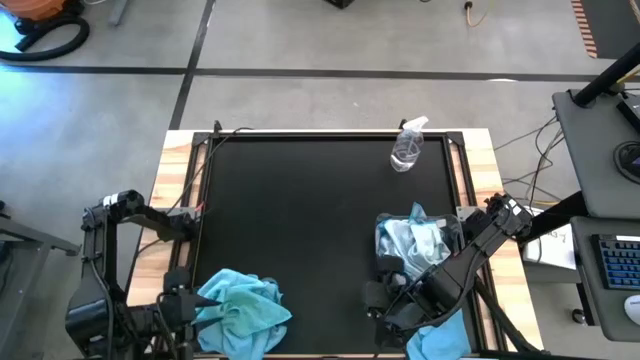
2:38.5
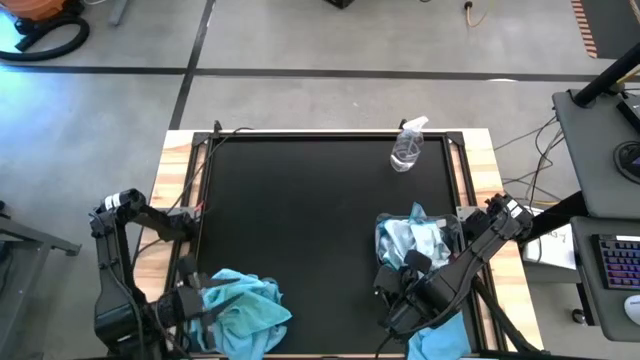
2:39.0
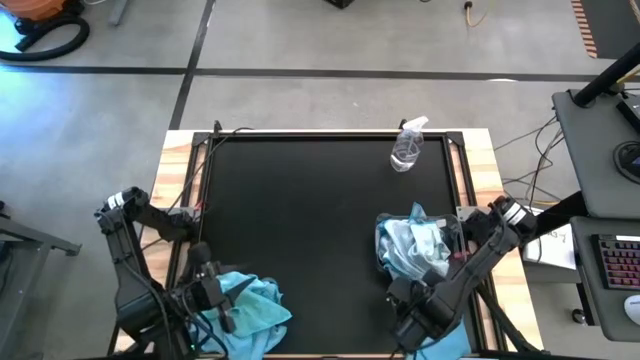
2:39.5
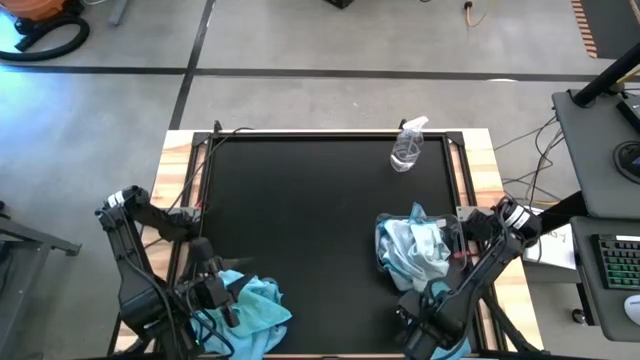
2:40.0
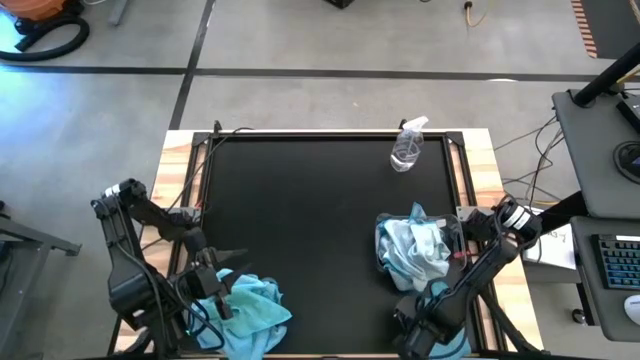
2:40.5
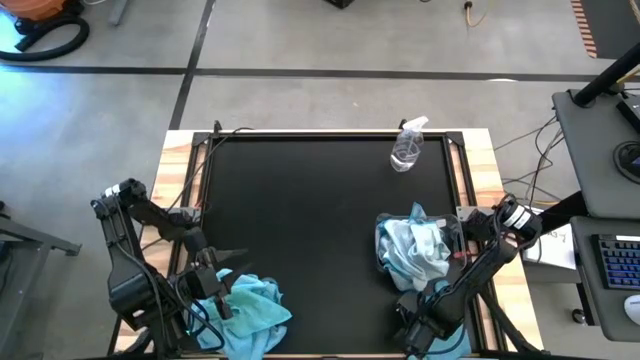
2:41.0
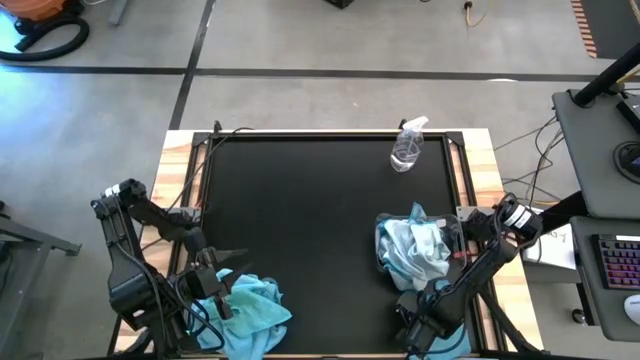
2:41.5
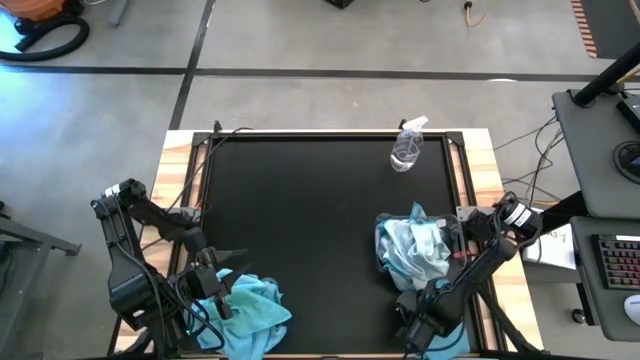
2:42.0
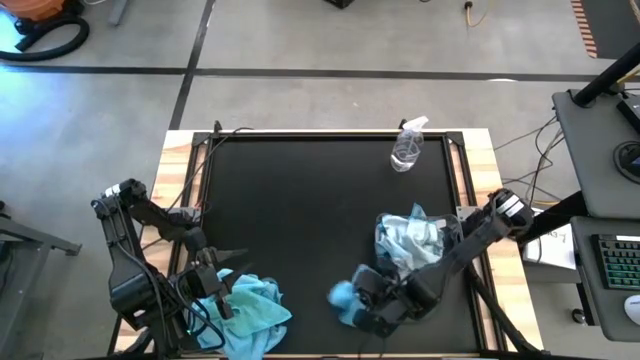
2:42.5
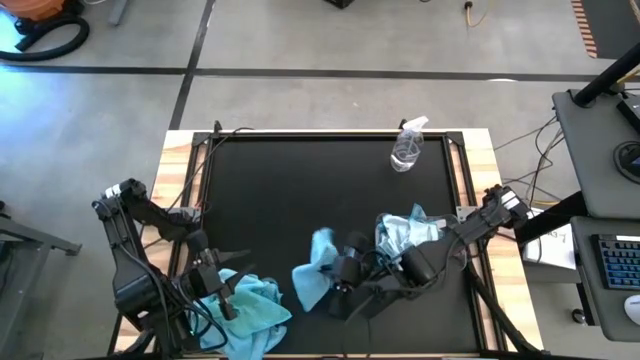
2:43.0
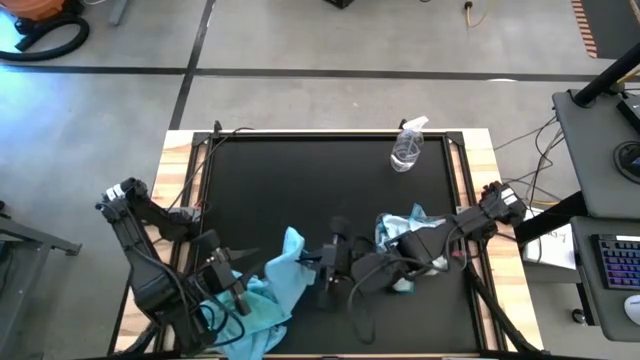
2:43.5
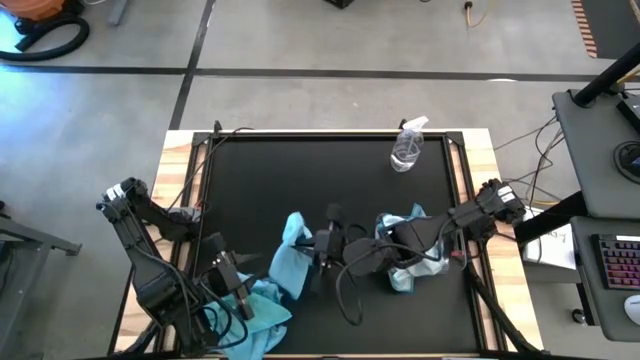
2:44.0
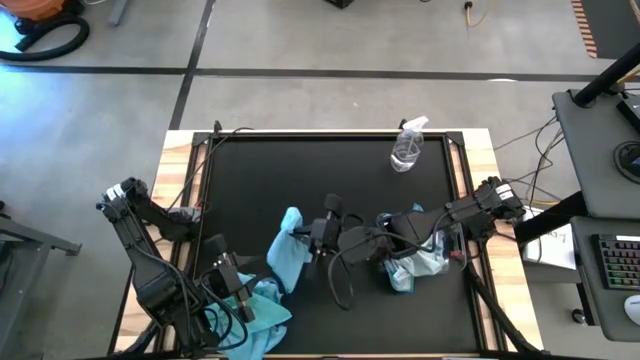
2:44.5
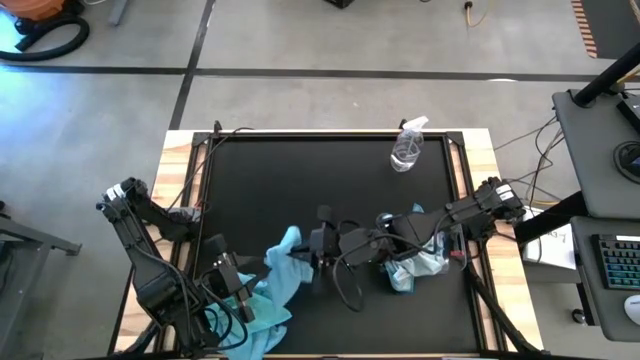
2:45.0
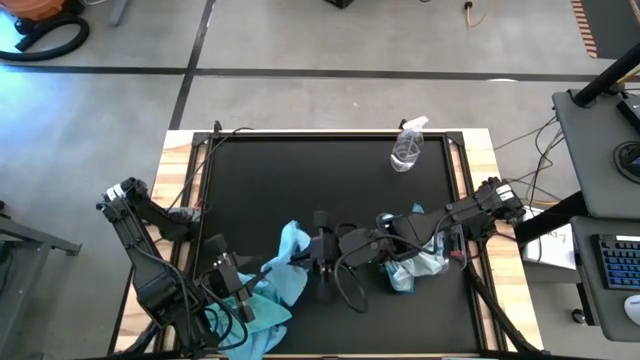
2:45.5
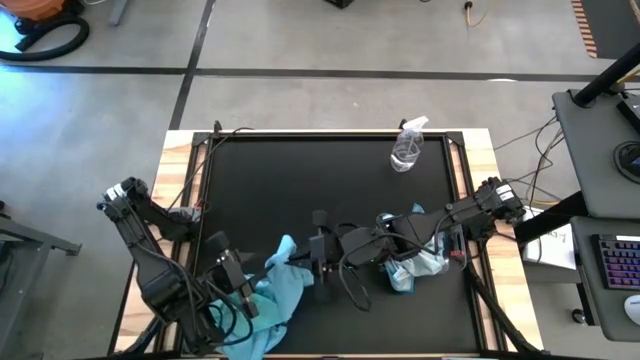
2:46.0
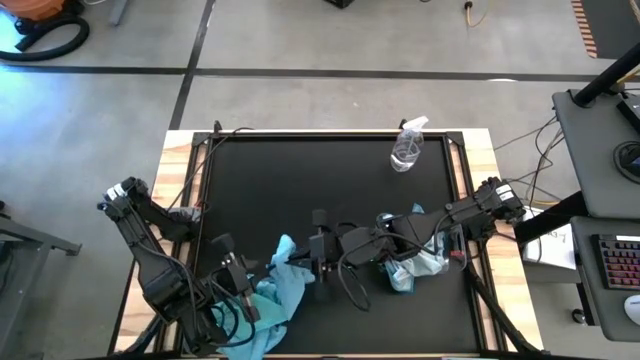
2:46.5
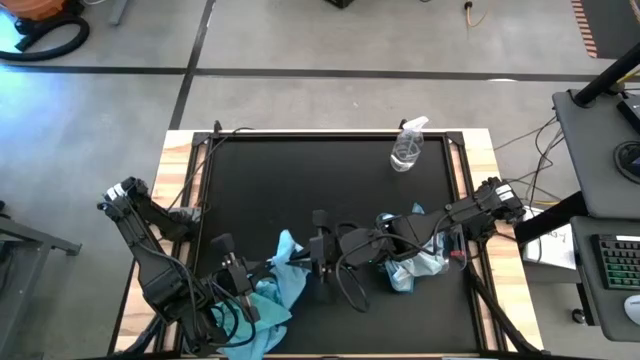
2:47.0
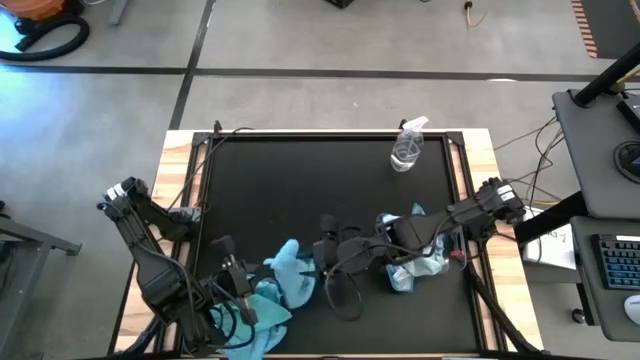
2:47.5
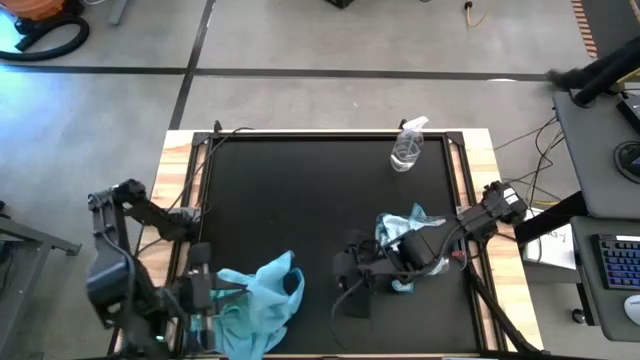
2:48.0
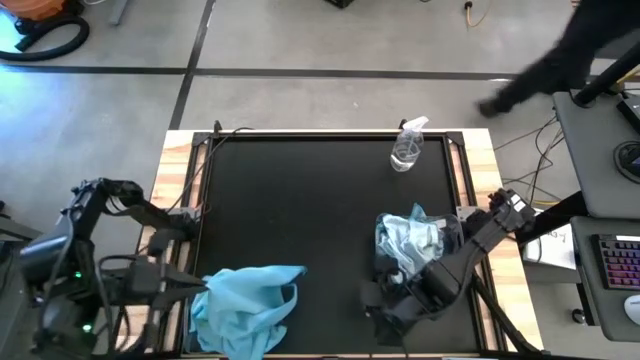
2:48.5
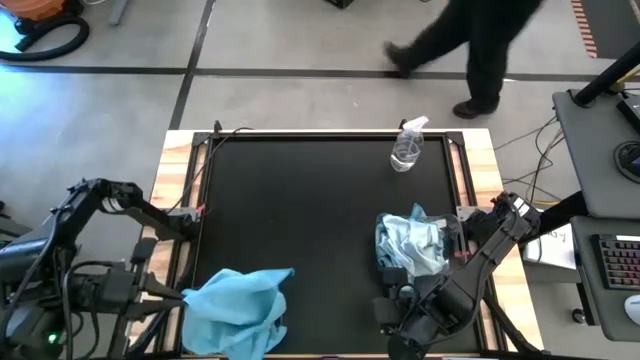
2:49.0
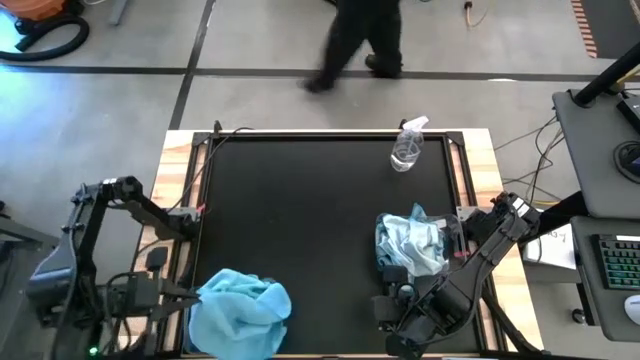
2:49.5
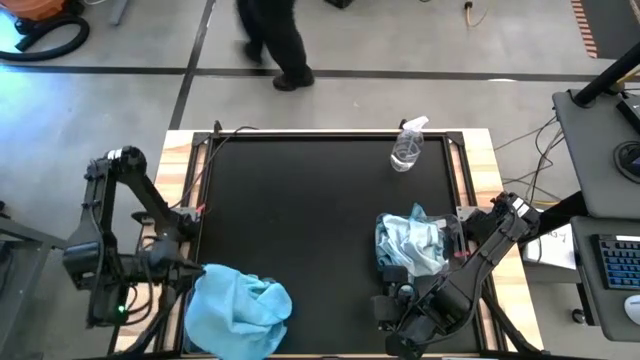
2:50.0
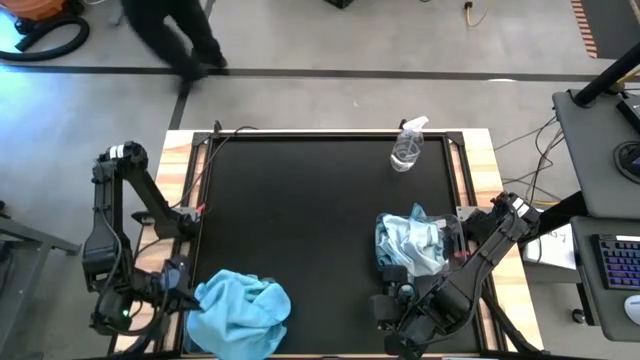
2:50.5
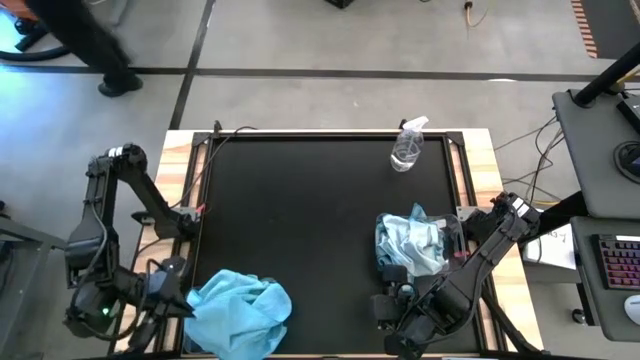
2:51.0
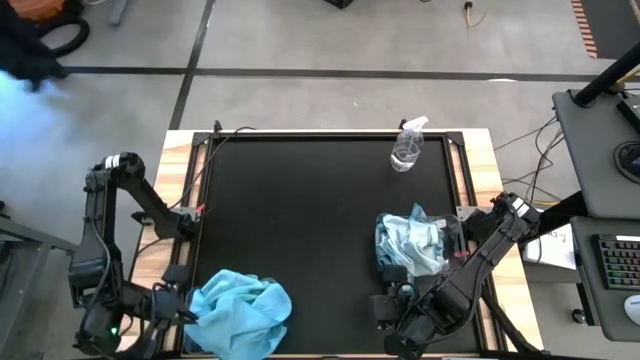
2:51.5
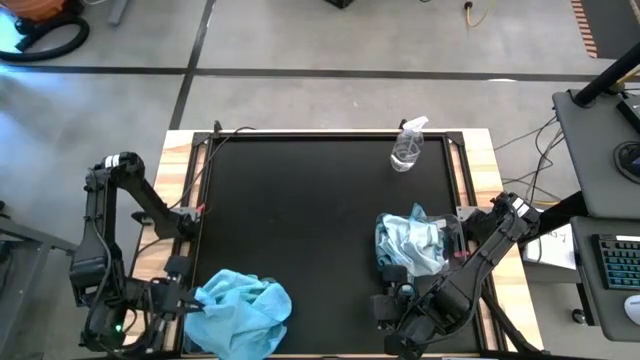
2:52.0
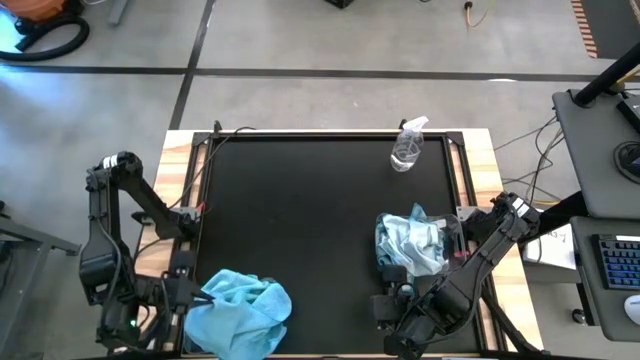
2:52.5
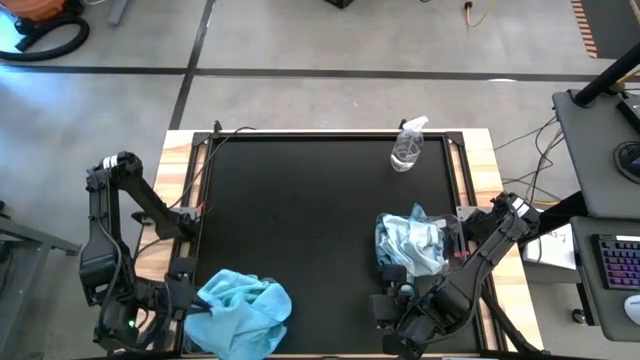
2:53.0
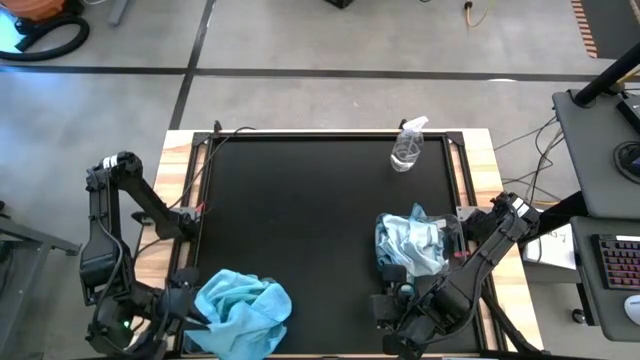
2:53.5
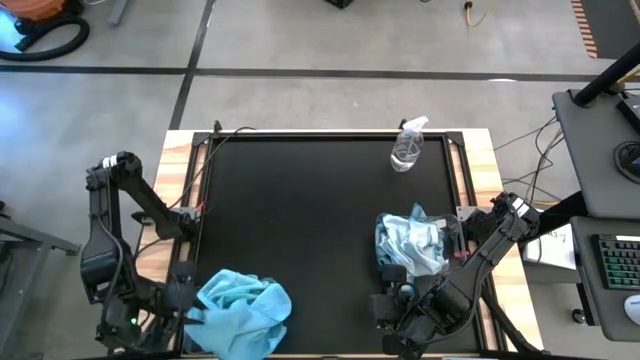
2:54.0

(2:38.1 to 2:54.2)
Task: Sort microfiber towel by color & place in baskets
Put the blue microfiber towel into the left transparent bin

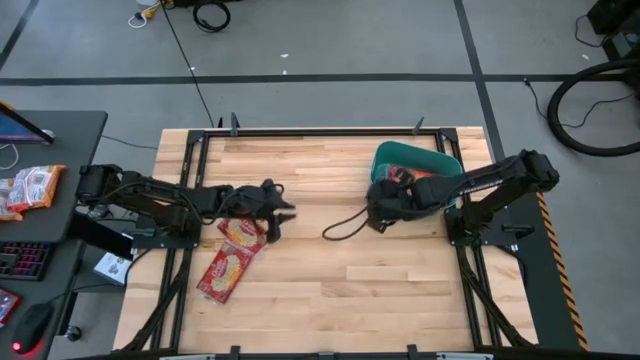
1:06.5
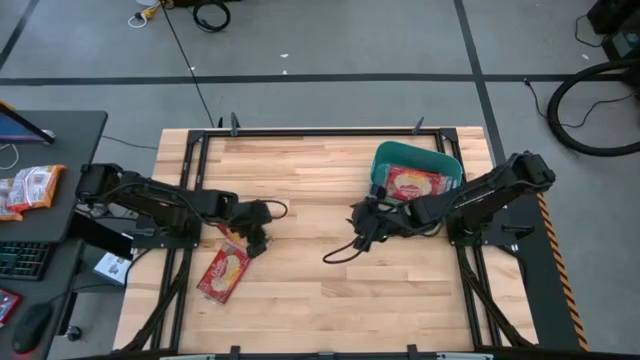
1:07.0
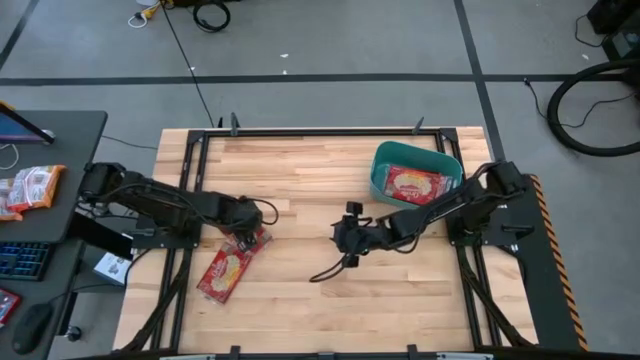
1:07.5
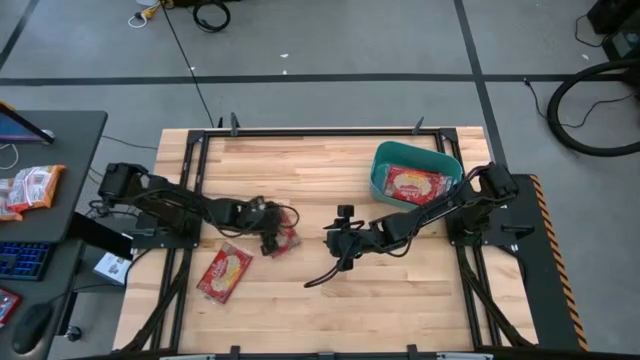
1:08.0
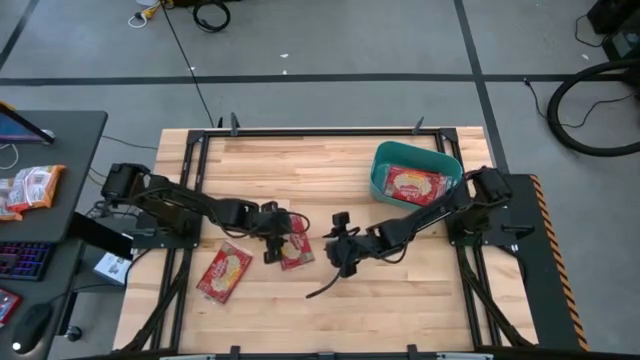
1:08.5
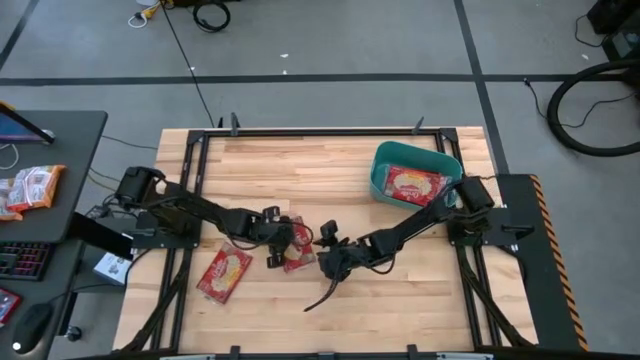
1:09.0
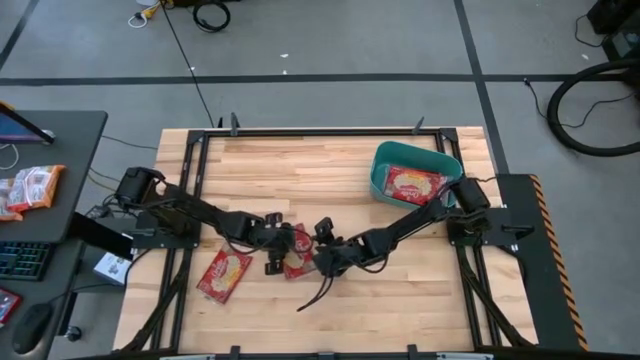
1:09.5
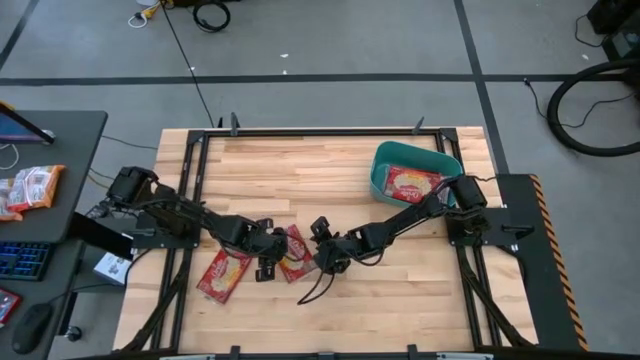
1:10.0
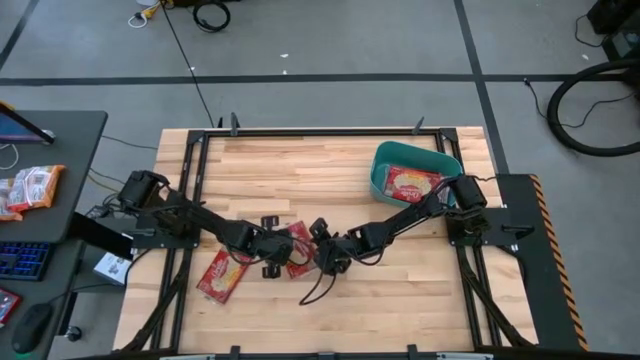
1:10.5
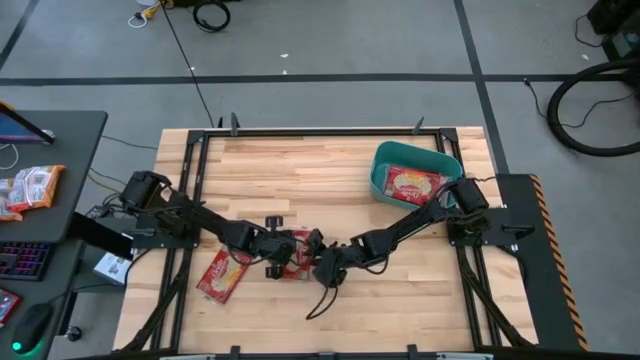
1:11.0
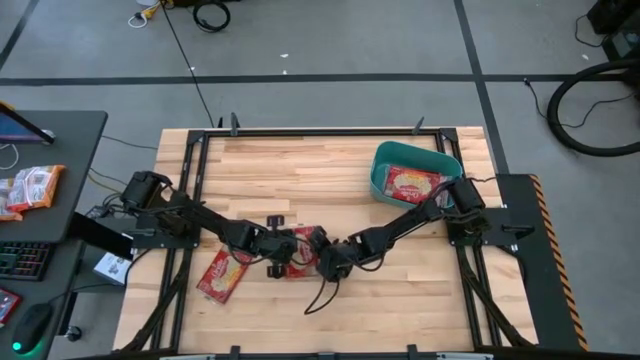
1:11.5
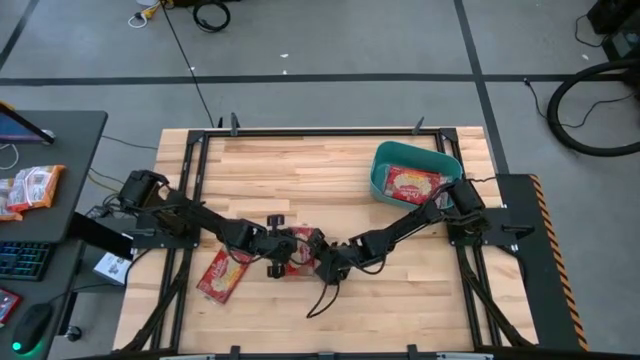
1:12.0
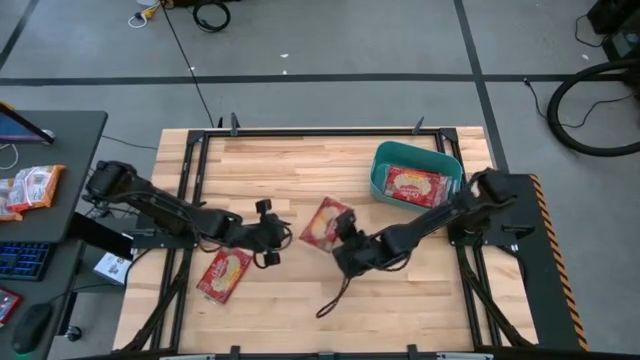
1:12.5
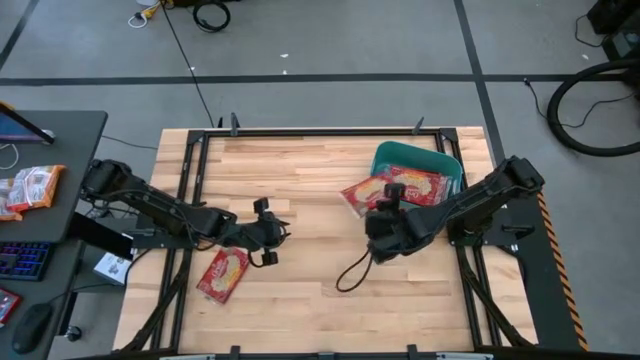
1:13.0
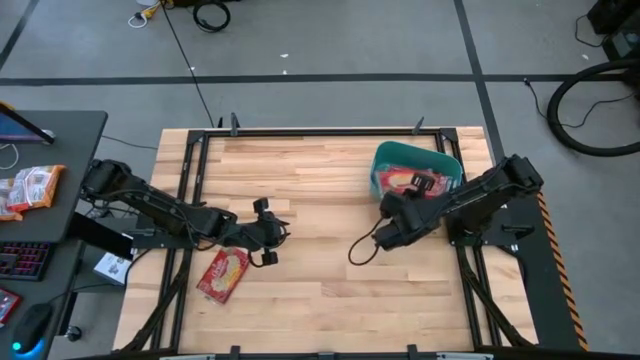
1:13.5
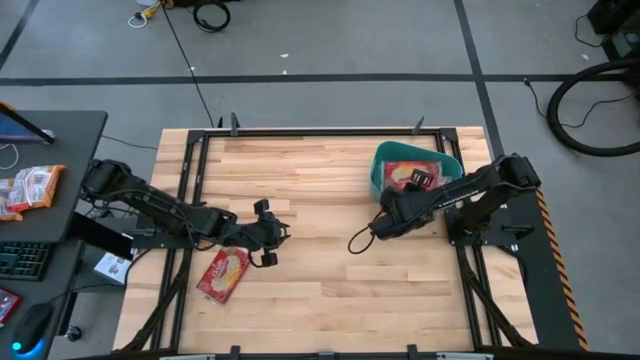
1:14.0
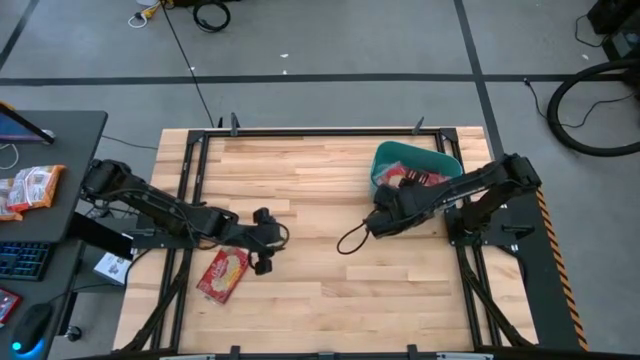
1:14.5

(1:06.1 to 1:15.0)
Task: Sort popcorn bags into baskets
Put the red popcorn bag into the green container
